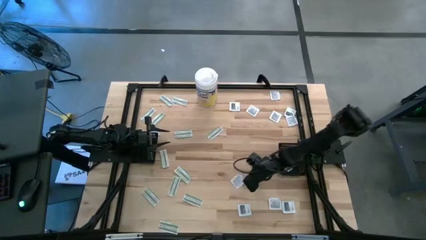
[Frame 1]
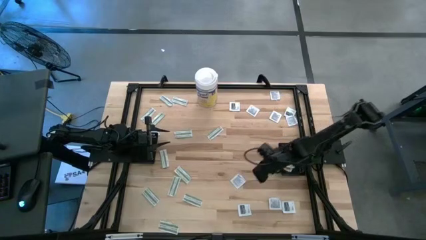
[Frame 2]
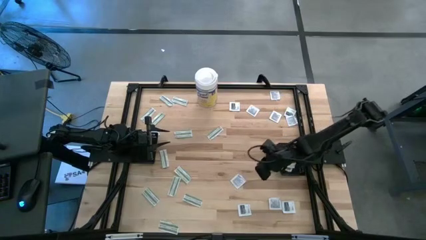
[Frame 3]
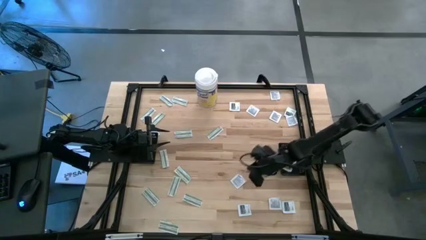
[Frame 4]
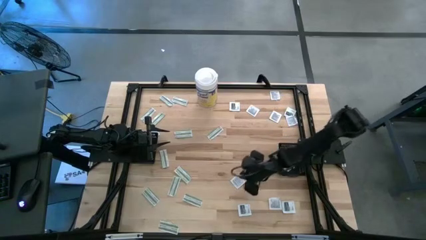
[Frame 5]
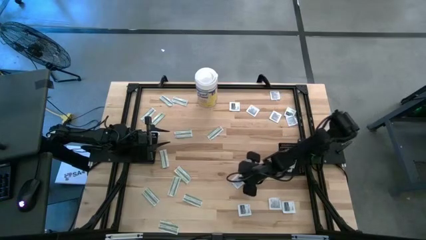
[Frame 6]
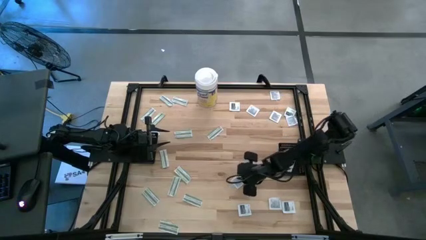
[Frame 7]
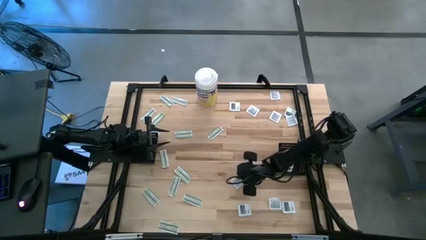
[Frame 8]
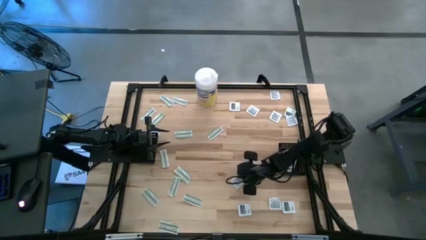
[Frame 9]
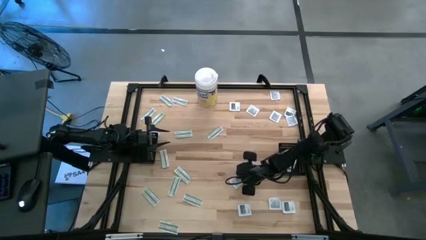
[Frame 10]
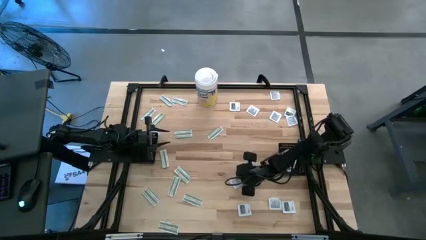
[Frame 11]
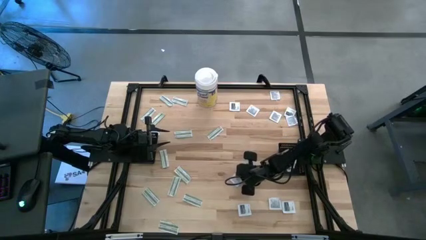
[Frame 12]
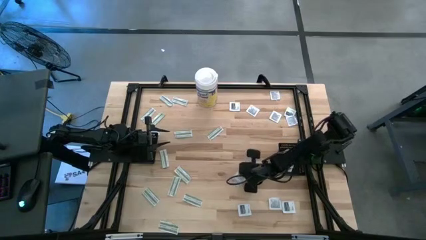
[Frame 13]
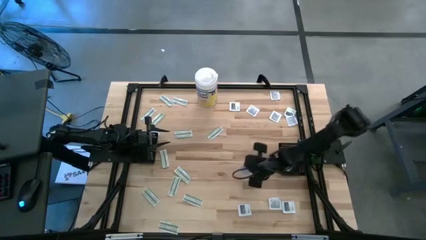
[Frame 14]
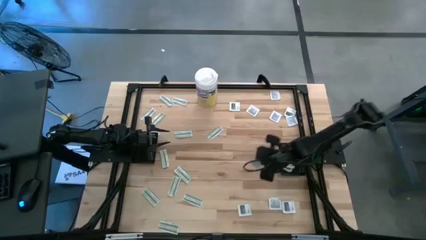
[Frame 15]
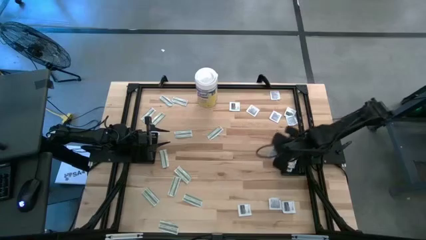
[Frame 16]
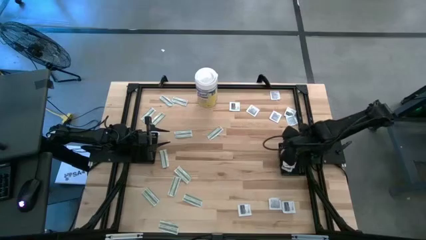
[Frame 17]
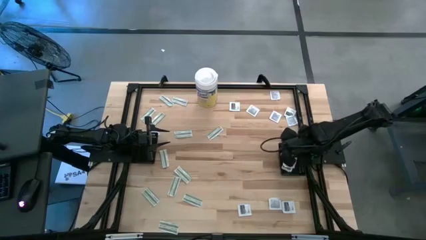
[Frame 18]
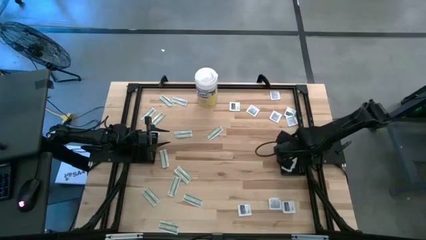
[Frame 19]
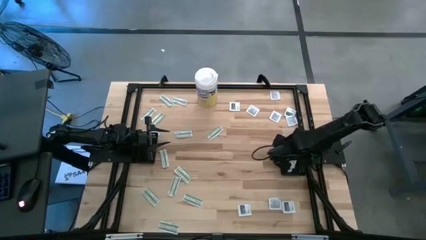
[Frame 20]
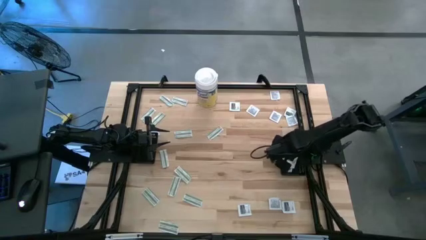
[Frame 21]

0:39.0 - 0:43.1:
Task: Pick & Place First Aid Supplies
Put the towelette pack into the right black basket

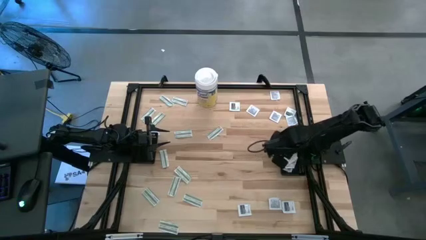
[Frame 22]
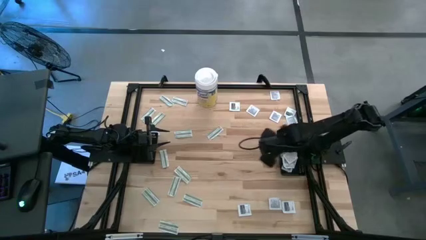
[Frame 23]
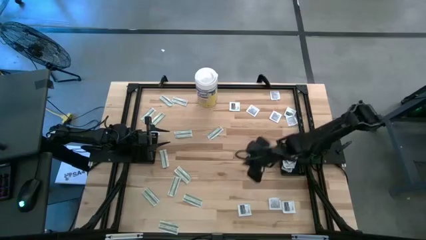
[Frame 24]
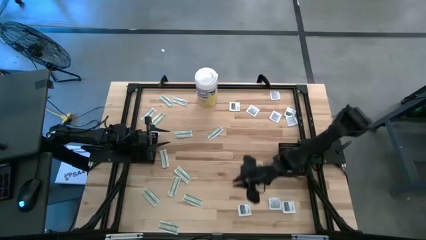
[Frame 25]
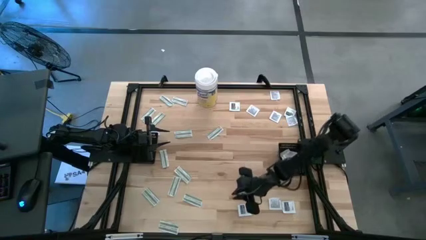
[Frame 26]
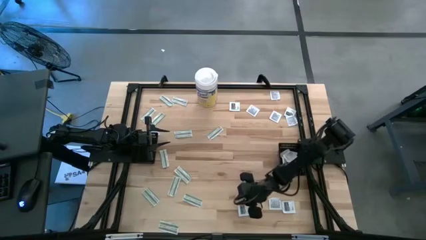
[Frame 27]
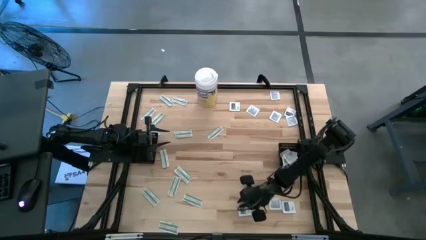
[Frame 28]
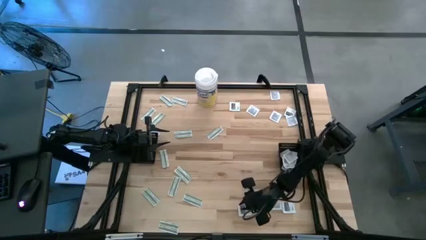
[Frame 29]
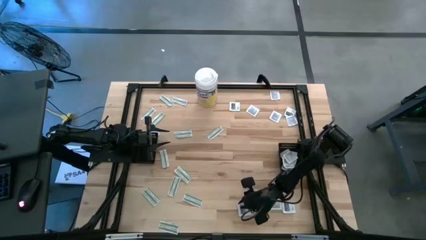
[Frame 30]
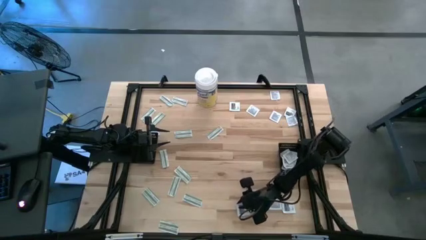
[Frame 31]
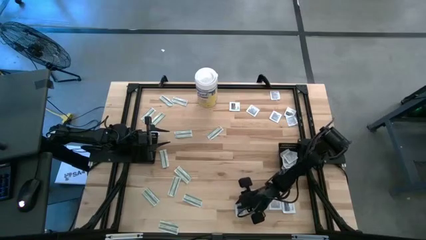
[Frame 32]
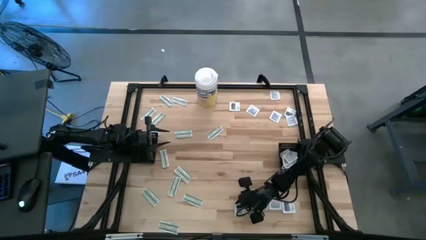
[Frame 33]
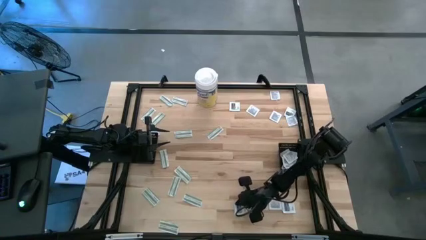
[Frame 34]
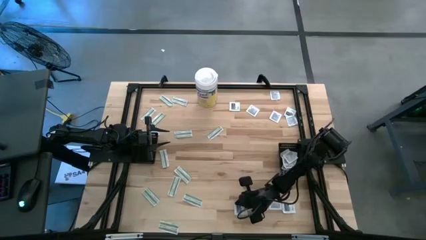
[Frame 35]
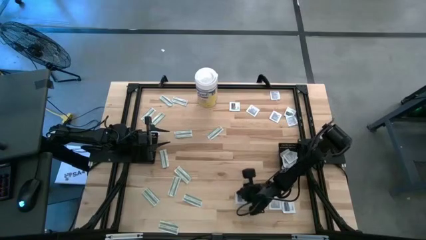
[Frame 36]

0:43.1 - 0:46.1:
Put the towelette pack into the right black basket

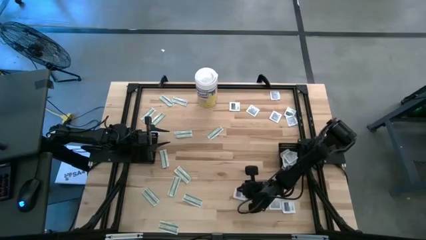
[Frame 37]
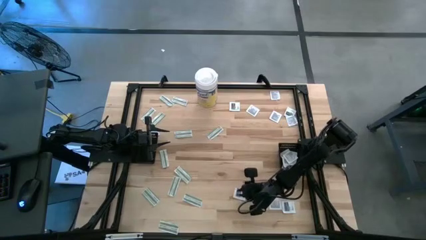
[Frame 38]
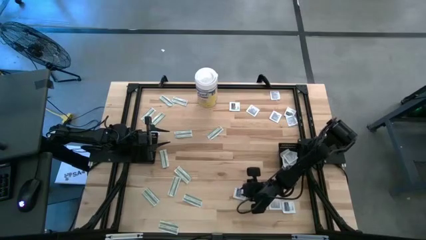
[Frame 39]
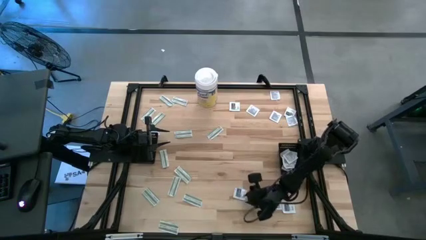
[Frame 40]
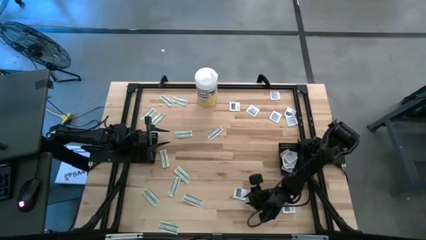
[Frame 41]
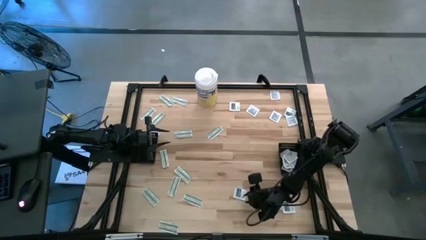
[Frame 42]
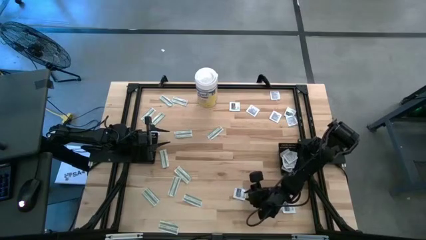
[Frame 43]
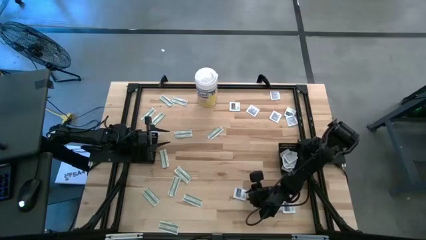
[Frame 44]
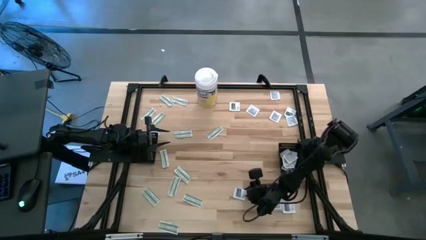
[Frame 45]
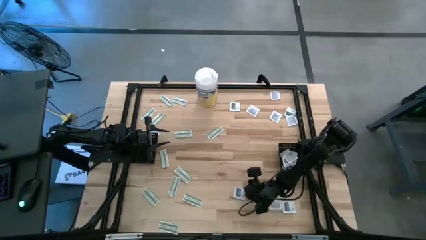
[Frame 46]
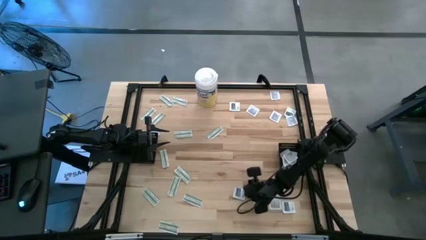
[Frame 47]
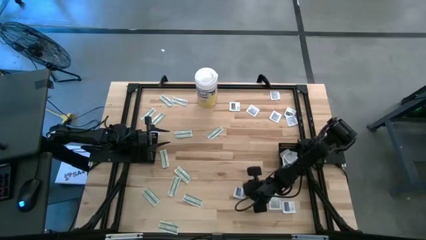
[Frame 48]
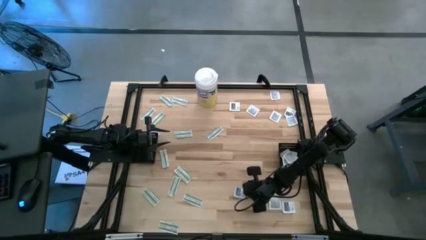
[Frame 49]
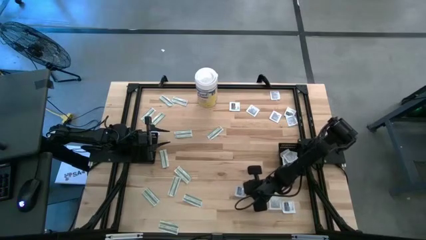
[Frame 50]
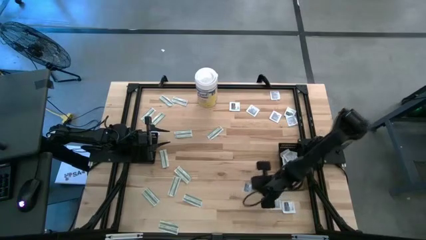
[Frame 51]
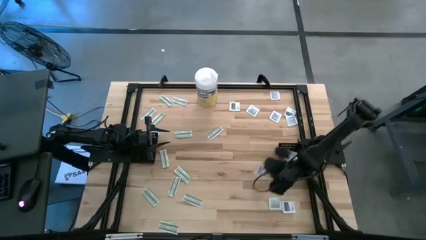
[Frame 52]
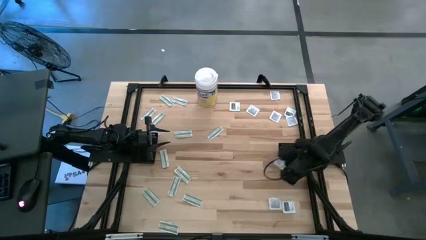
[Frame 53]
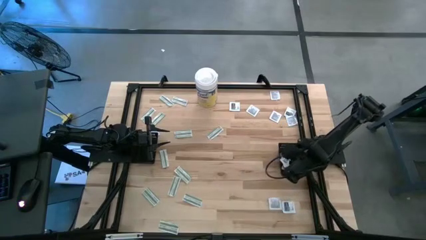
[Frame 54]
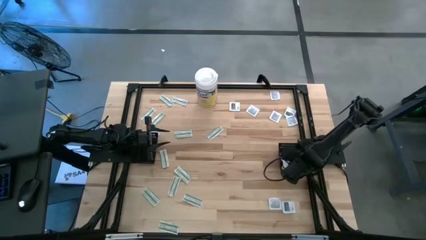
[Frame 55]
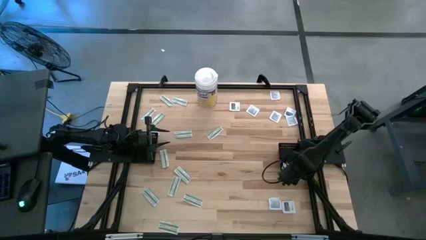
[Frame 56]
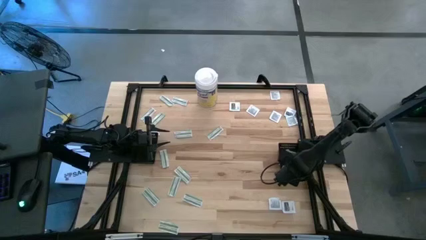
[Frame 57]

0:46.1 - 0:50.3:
Put the towelette pack into the right black basket

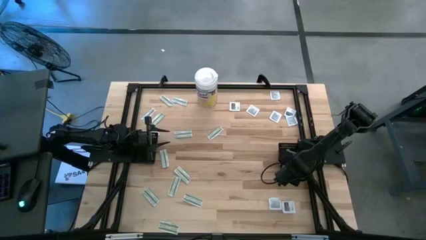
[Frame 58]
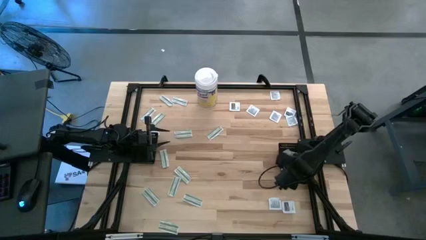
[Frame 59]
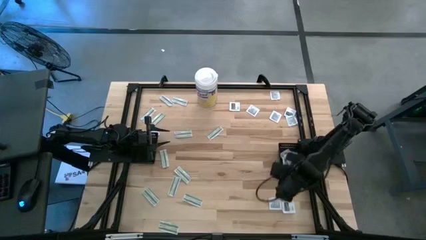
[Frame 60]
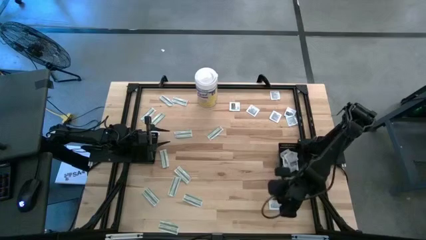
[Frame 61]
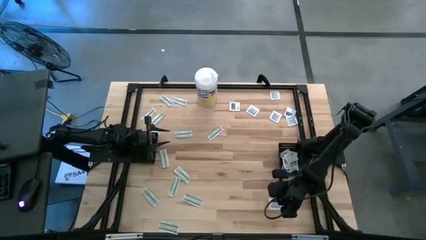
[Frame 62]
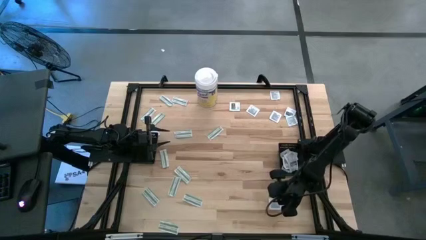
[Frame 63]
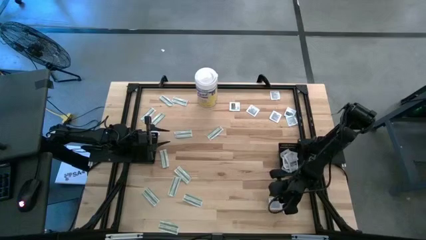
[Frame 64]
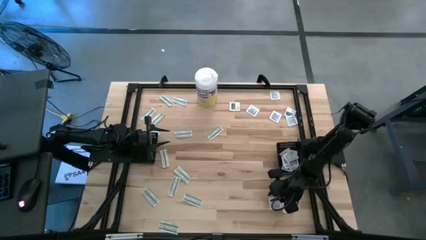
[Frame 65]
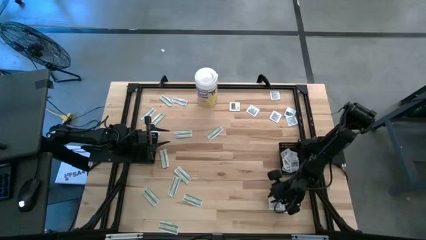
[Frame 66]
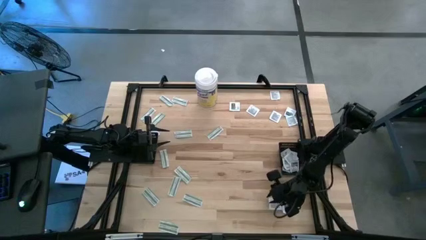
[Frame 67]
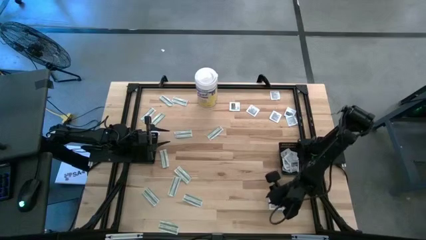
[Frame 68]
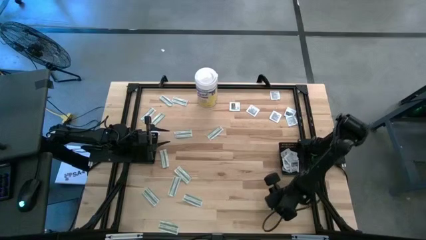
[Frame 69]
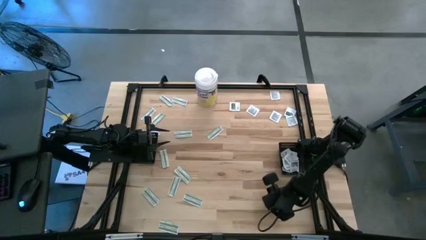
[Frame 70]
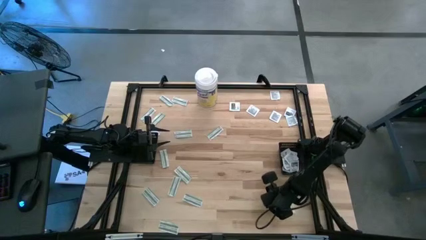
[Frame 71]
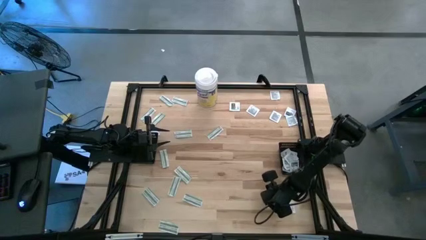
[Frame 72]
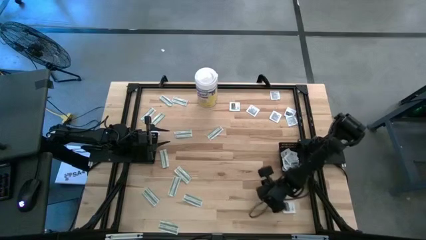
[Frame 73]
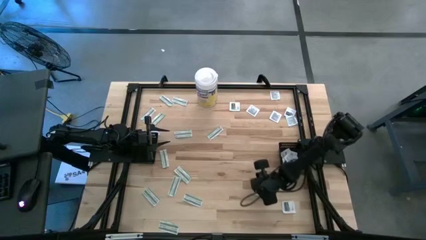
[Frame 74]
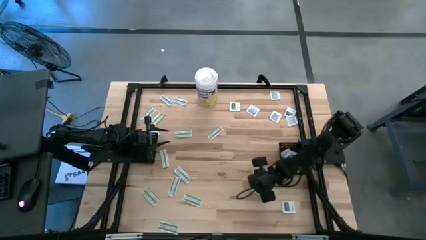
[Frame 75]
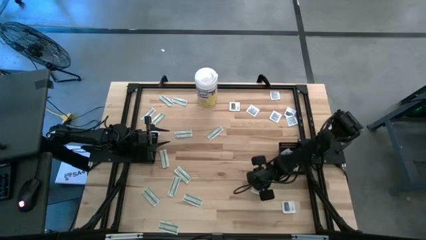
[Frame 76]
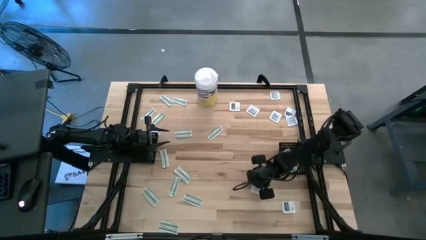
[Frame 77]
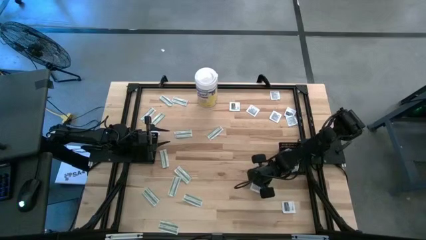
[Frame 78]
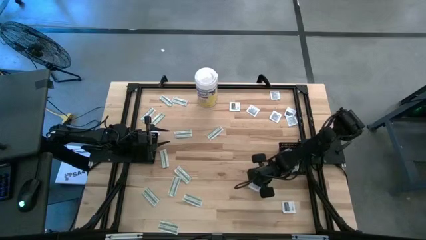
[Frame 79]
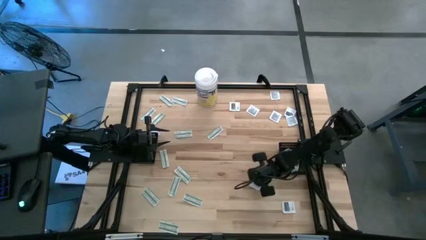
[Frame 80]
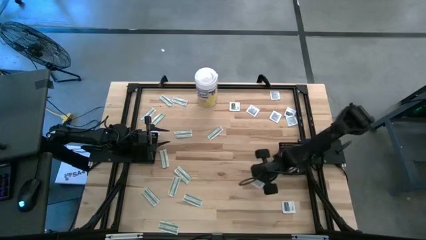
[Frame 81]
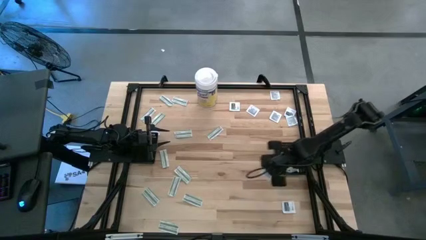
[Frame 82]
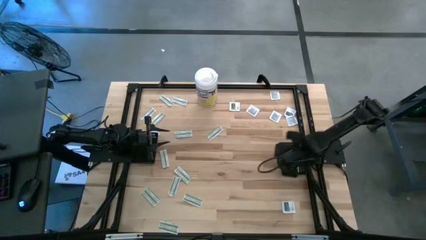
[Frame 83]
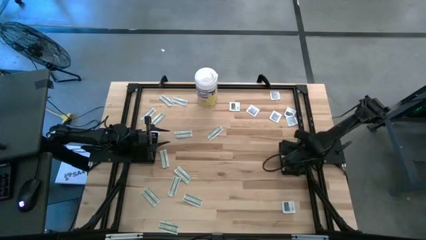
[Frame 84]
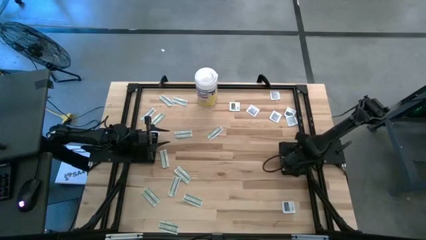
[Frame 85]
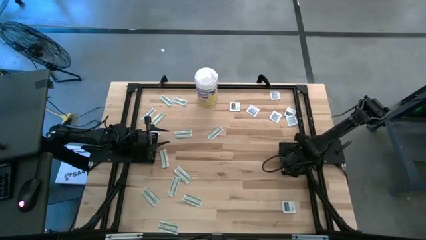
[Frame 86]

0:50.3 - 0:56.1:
Put the towelette pack into the right black basket
